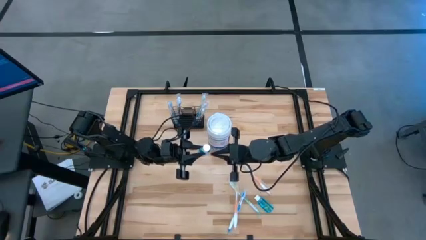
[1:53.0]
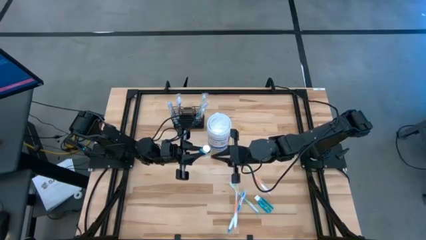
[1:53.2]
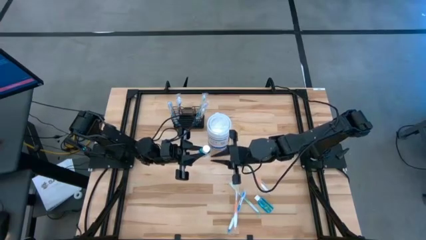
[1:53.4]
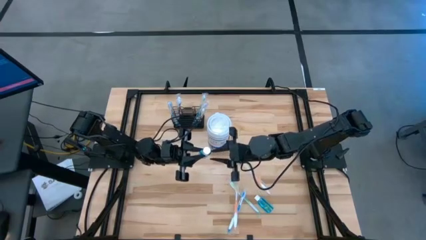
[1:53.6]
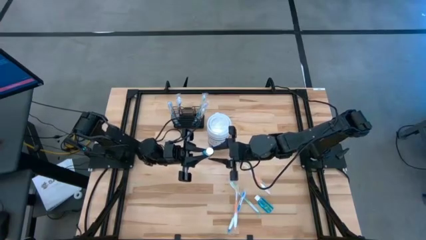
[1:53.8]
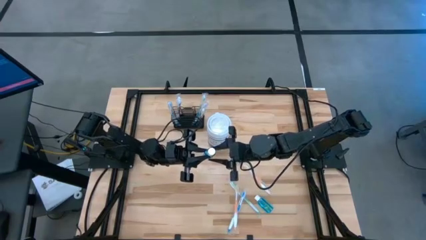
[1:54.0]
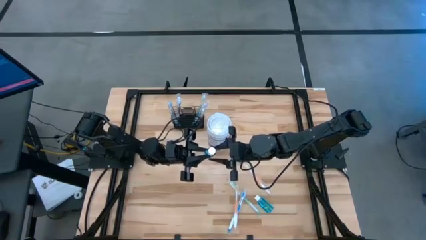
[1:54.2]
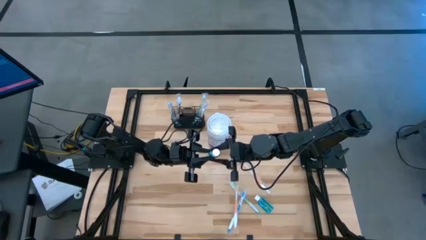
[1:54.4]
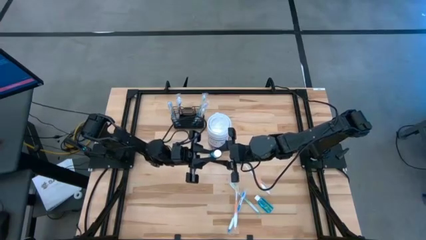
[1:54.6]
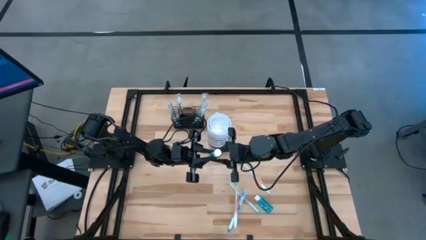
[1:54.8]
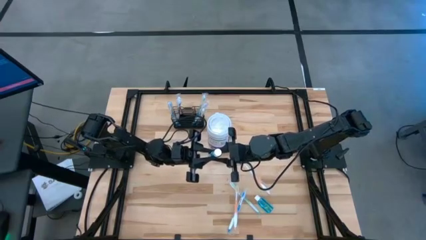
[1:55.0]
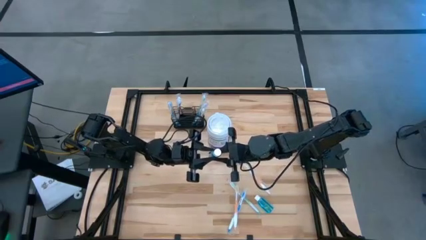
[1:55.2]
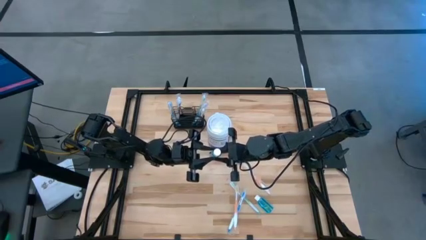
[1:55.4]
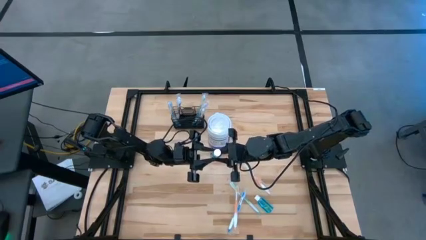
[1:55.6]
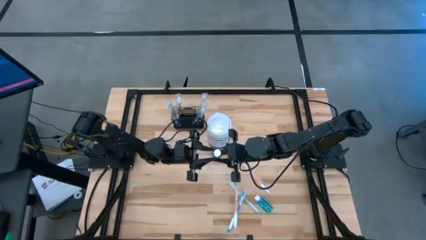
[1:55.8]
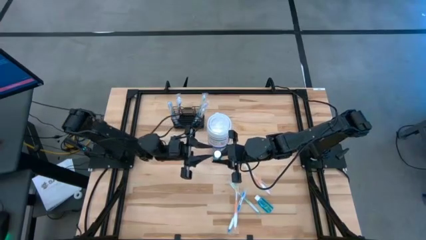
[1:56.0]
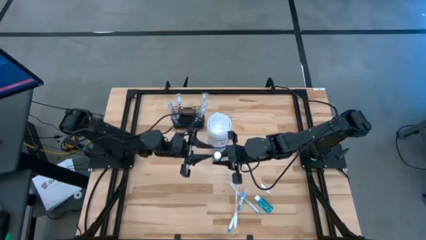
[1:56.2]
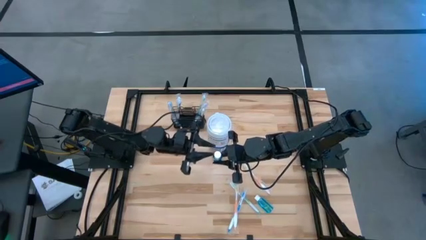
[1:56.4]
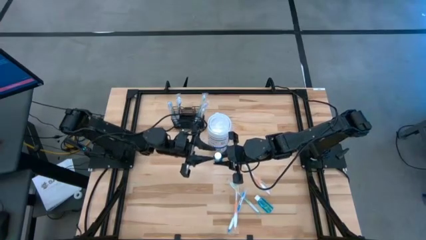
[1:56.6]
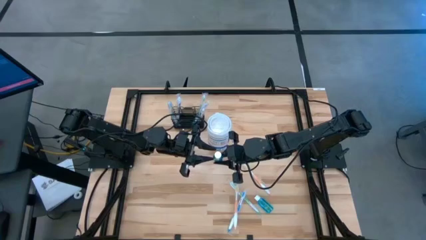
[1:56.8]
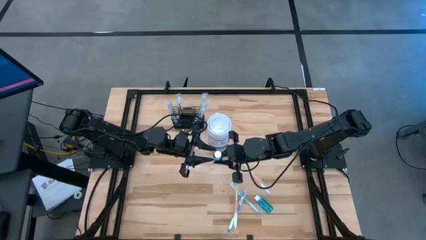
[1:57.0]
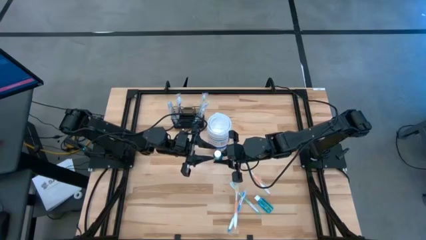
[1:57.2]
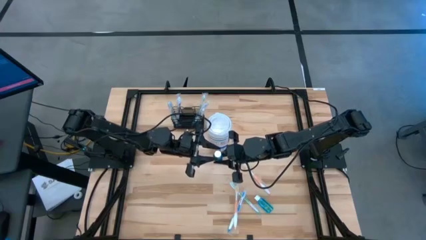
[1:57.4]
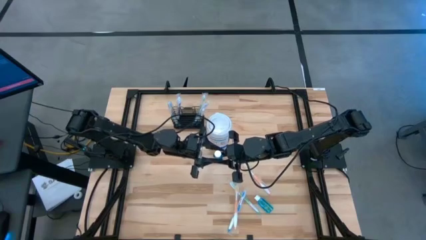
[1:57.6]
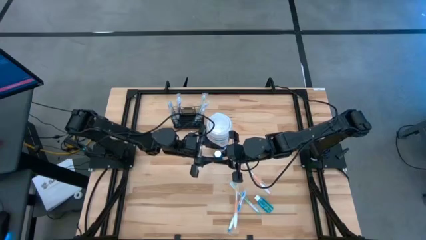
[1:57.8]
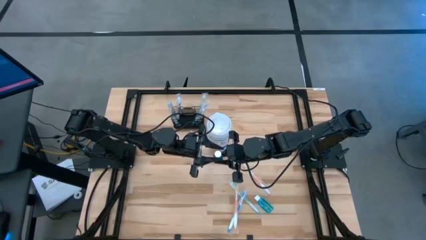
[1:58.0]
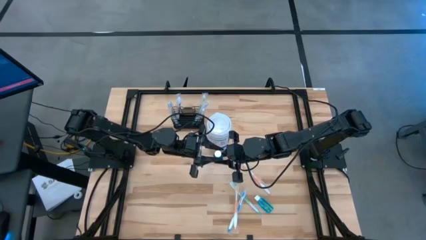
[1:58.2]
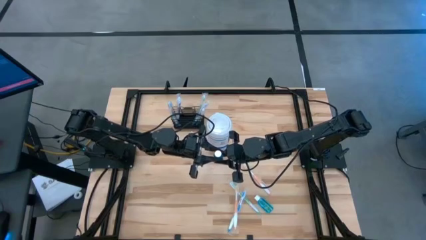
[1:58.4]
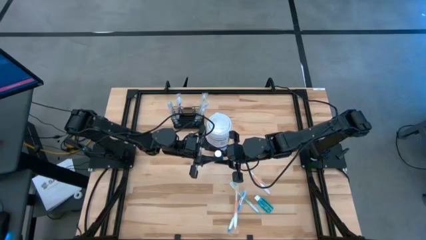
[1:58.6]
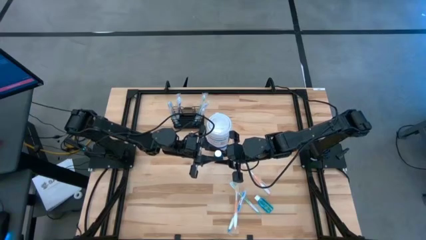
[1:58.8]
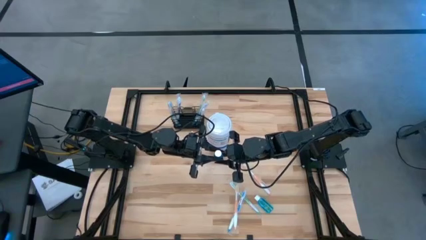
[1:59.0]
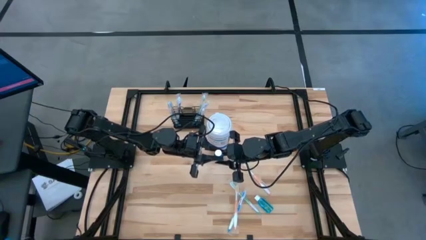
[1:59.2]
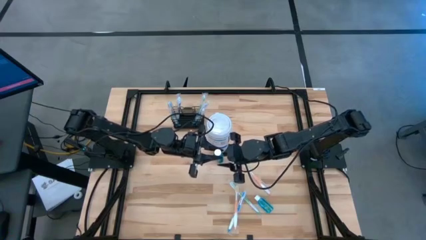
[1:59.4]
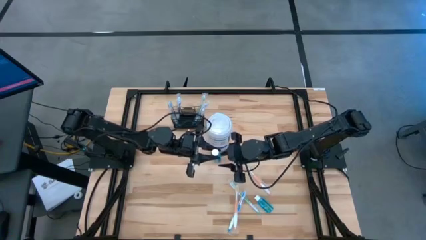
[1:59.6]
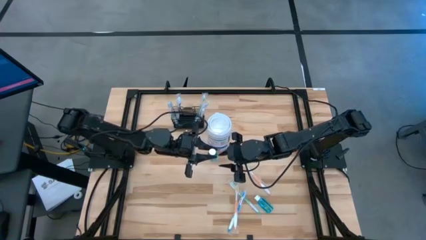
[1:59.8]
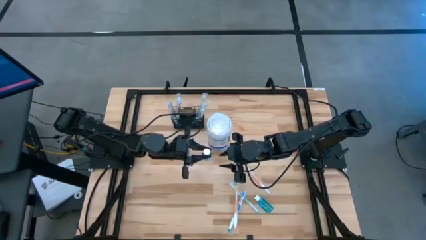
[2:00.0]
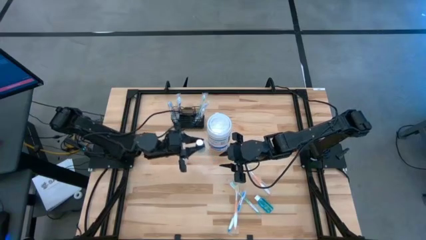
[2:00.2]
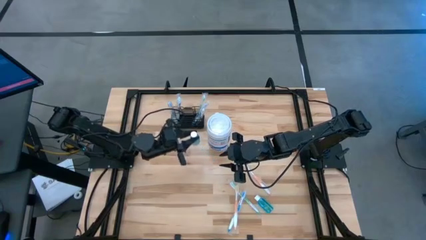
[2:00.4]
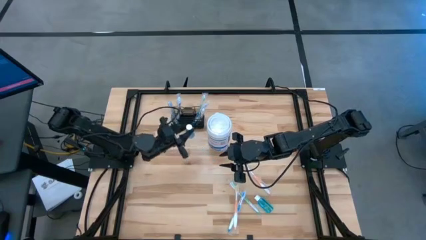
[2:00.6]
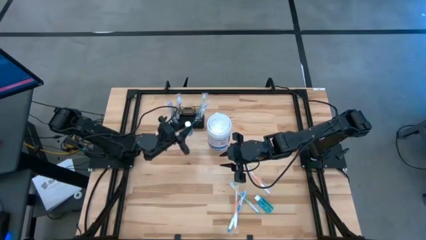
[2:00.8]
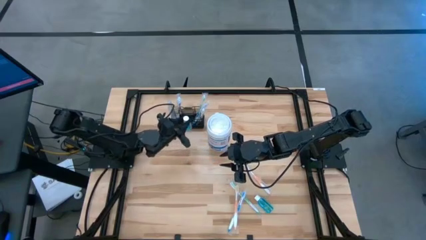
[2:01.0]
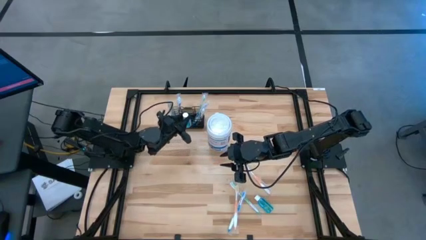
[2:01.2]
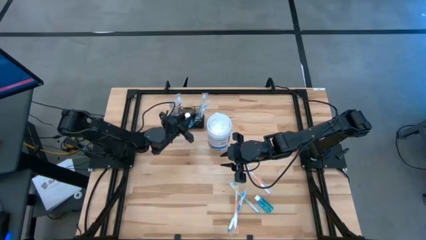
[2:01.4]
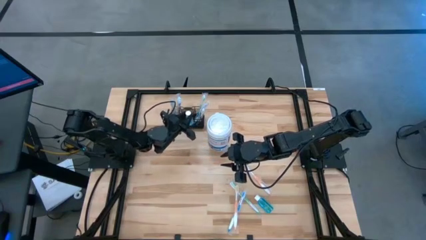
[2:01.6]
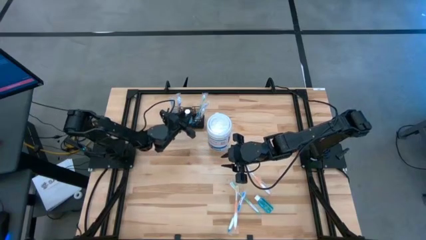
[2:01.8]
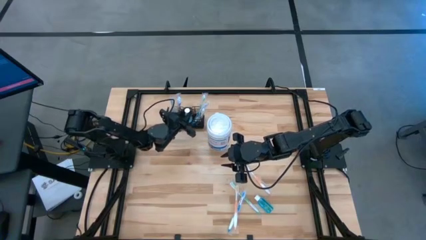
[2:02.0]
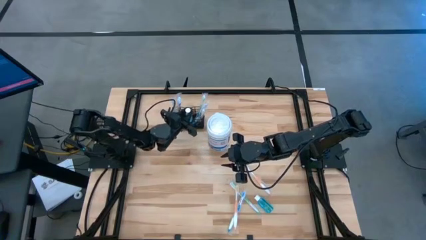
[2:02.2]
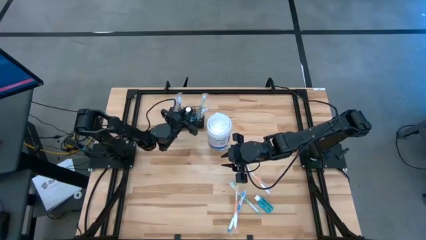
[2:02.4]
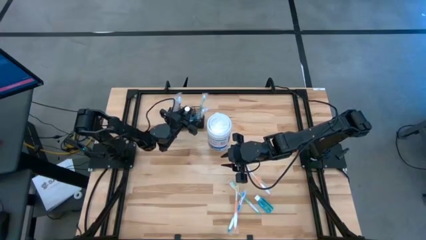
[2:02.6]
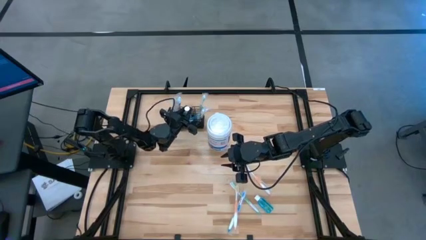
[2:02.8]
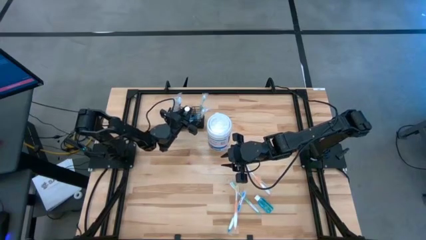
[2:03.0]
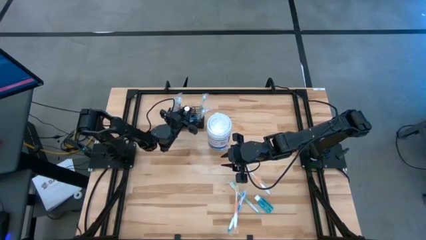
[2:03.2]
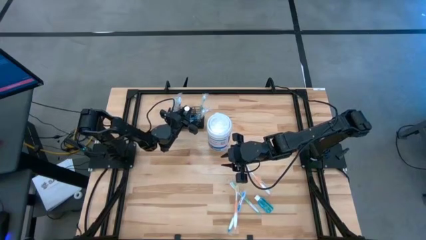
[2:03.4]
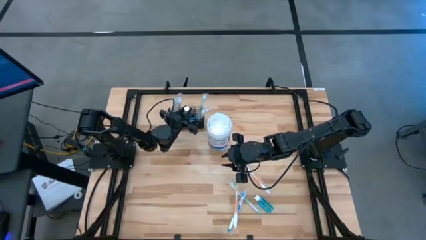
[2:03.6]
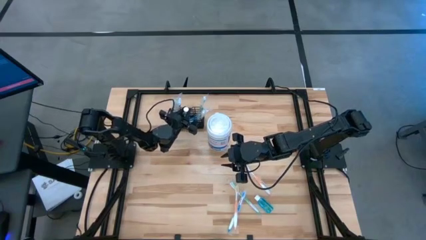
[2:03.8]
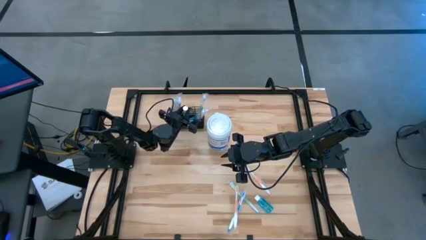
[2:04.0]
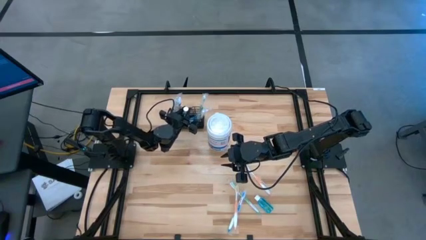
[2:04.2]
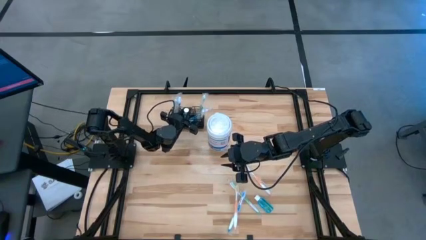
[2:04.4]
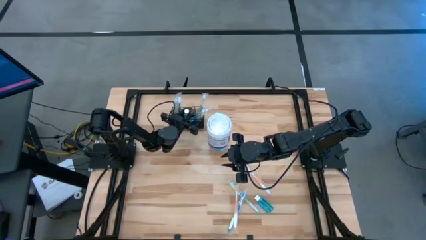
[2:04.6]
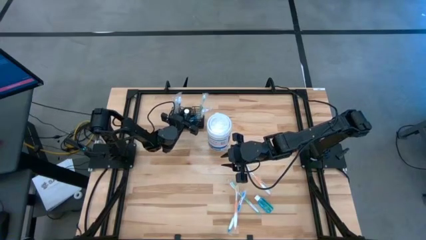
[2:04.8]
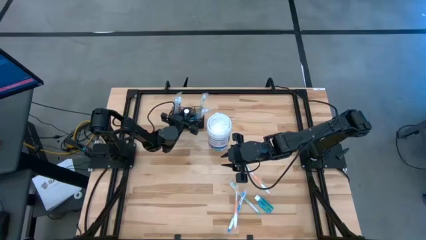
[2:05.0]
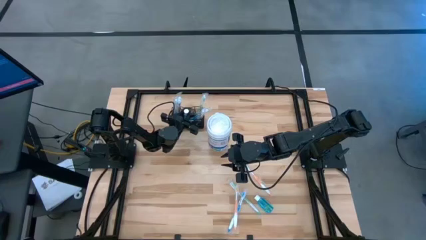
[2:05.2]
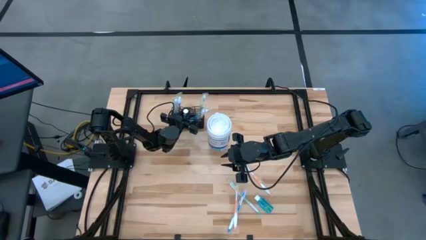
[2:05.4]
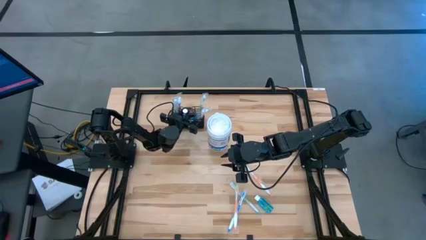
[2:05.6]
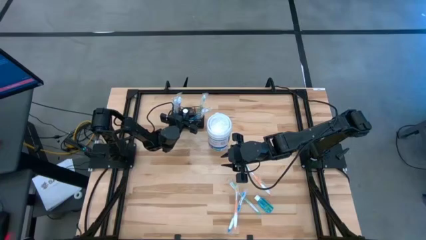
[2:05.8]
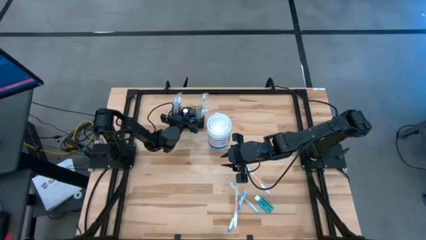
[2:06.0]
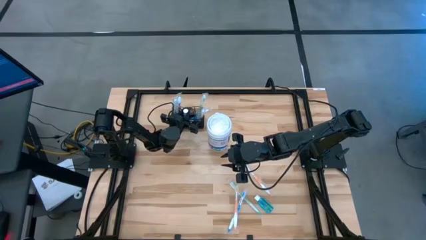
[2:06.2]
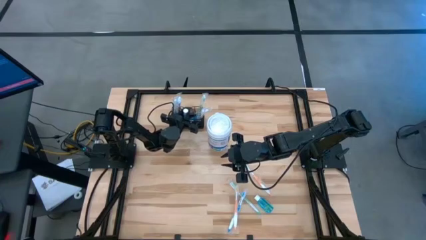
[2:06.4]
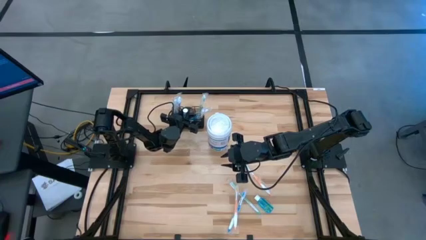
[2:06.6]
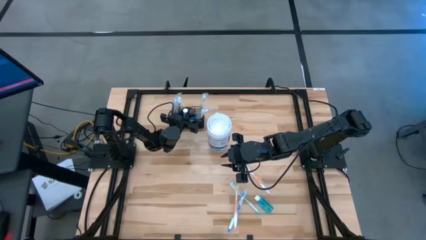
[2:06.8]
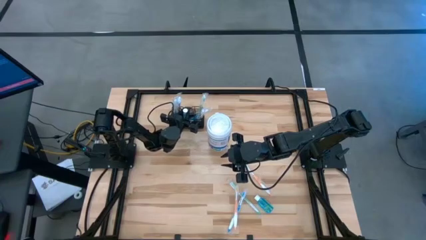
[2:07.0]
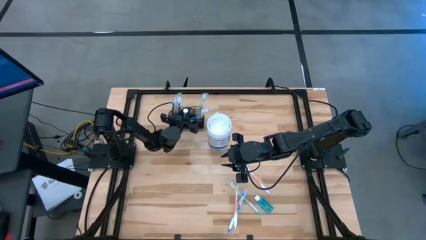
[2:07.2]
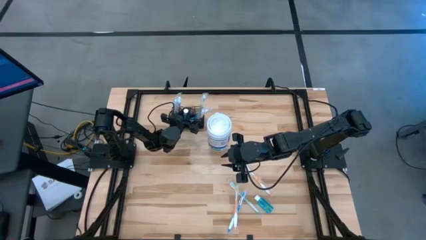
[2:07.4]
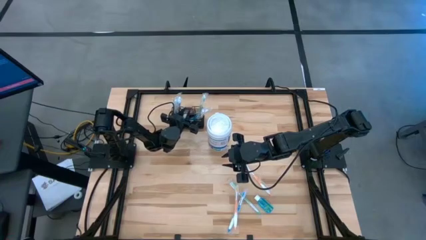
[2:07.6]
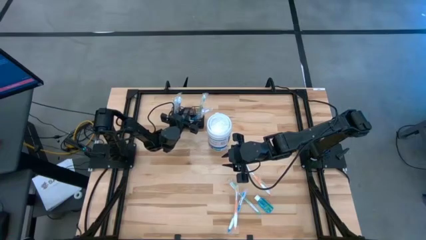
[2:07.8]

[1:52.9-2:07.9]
Task: Pick & Place toothbrushing station
Put the top blue mouthwash into the mesh organizer

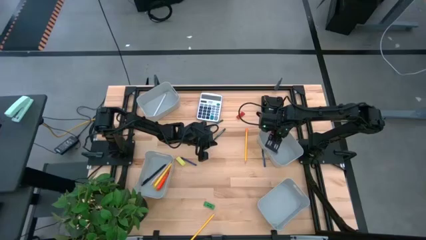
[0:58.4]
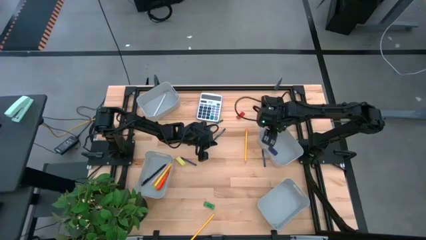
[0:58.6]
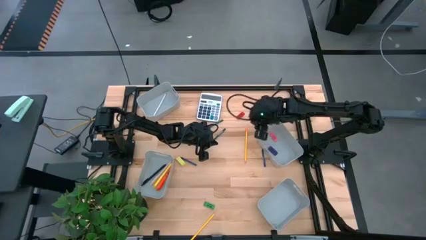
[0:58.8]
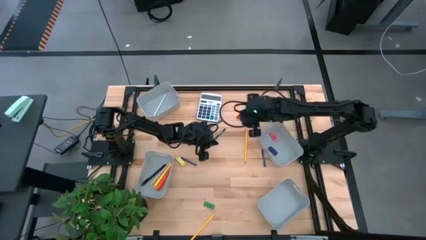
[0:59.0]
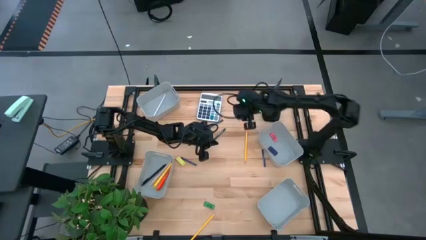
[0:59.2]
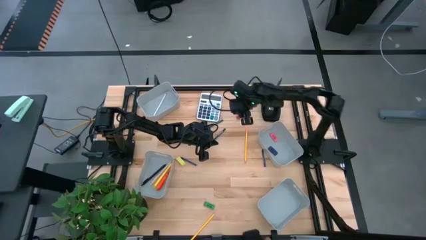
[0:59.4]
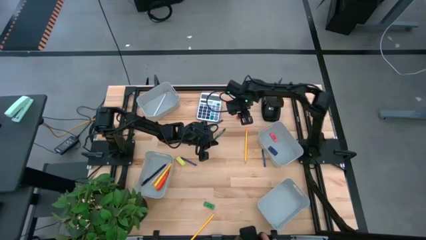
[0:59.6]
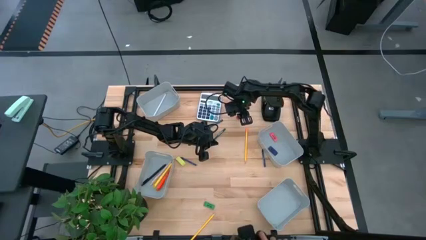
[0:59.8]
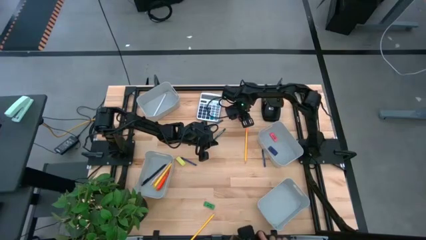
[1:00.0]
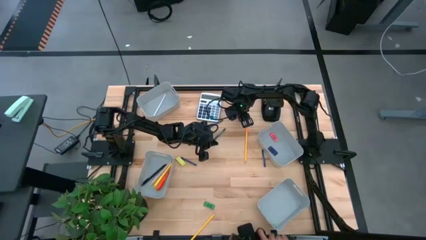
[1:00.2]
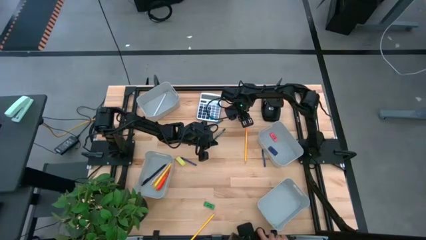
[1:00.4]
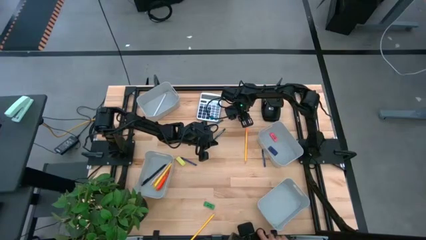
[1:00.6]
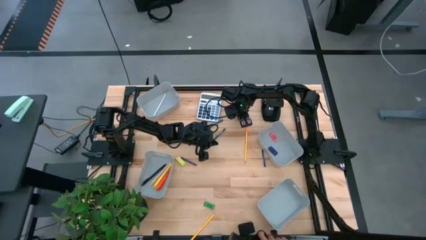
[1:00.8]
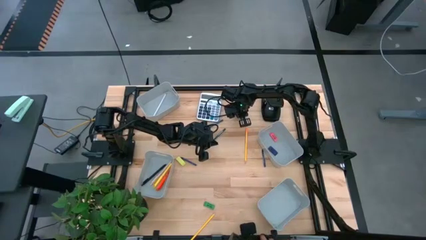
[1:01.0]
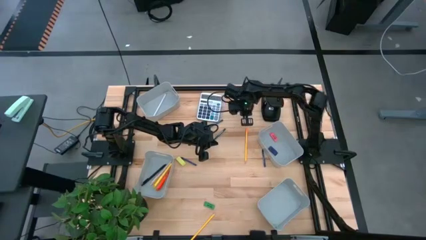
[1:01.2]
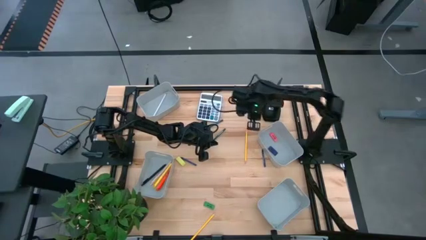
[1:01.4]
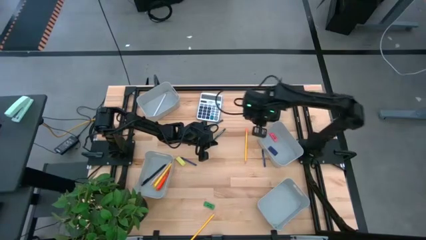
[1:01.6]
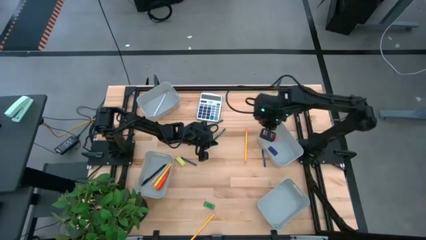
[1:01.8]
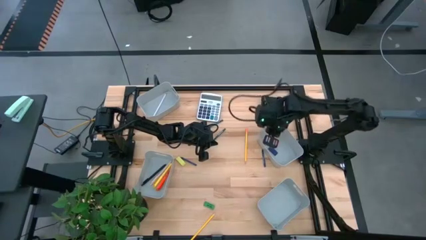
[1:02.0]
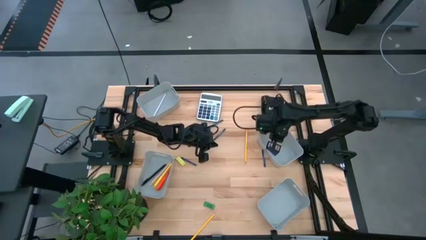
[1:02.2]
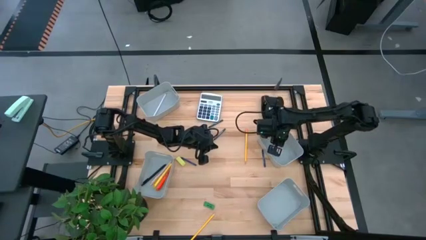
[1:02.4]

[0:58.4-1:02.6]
Task: Sort crayons/erasers/pens/pencils in bins
Put the orange eraser into the top left gray bin
